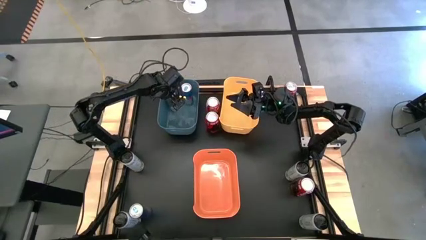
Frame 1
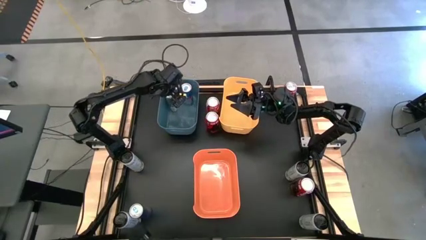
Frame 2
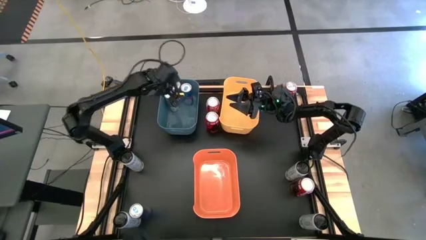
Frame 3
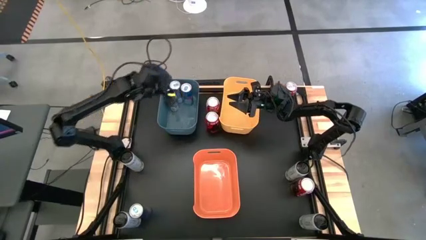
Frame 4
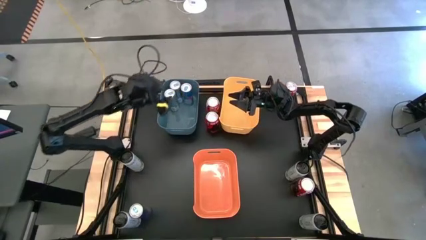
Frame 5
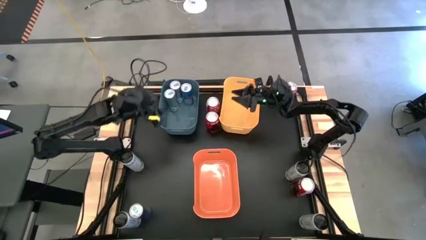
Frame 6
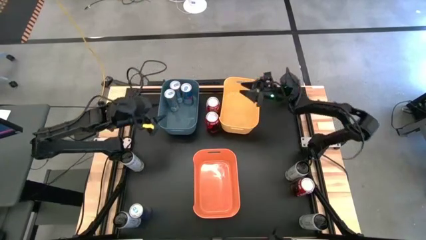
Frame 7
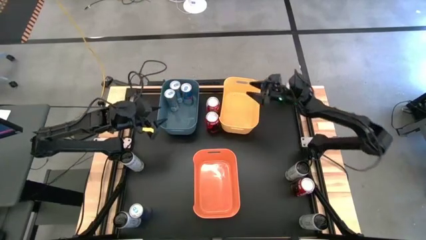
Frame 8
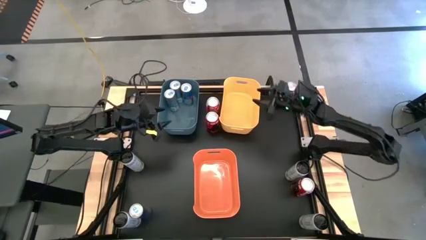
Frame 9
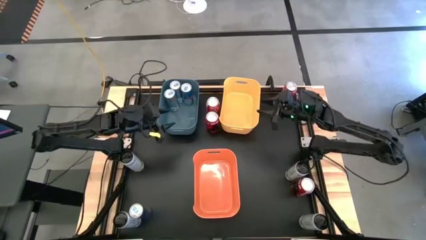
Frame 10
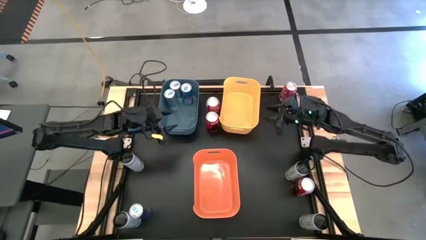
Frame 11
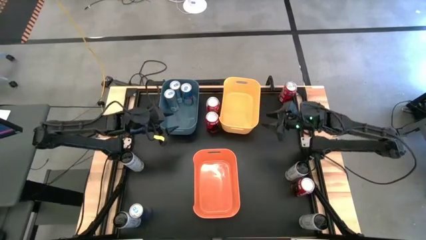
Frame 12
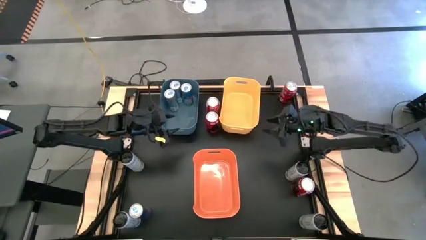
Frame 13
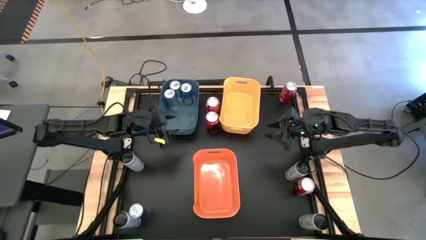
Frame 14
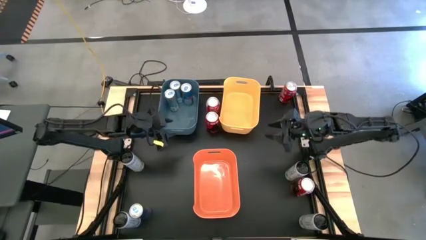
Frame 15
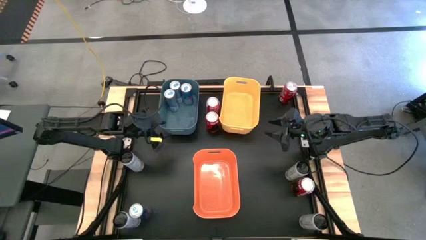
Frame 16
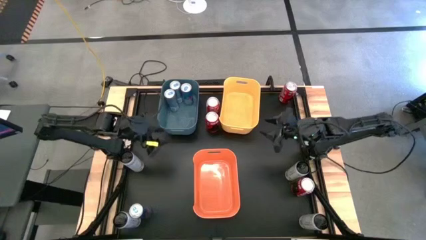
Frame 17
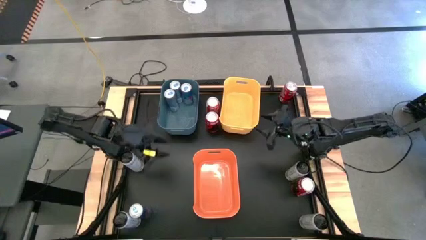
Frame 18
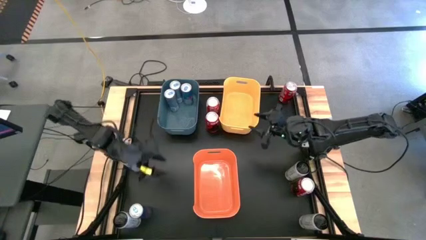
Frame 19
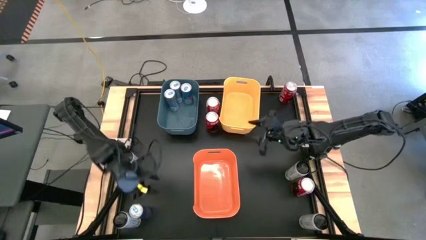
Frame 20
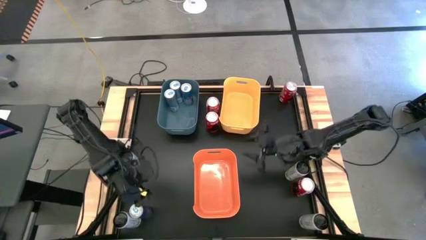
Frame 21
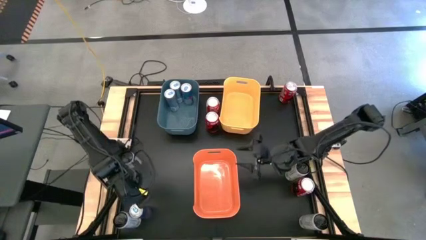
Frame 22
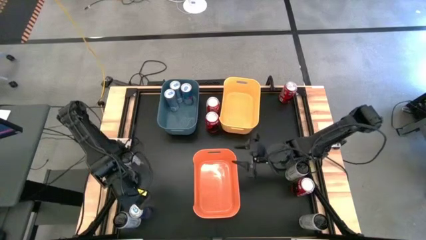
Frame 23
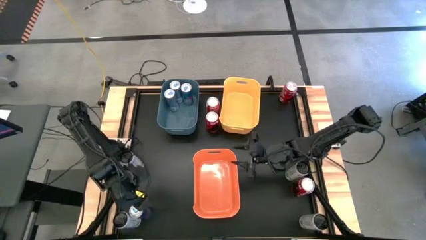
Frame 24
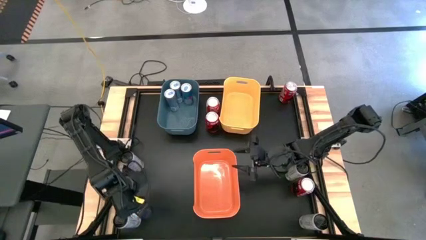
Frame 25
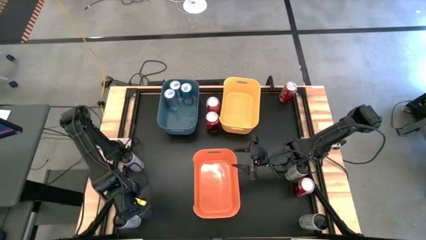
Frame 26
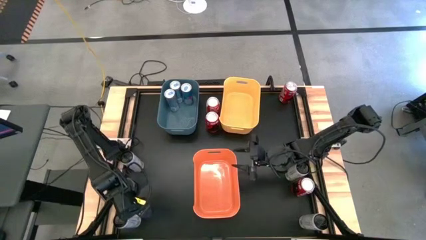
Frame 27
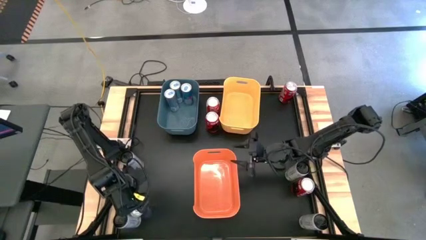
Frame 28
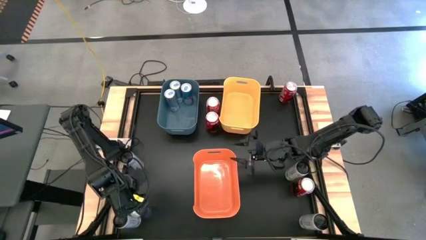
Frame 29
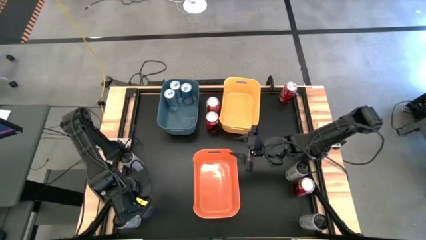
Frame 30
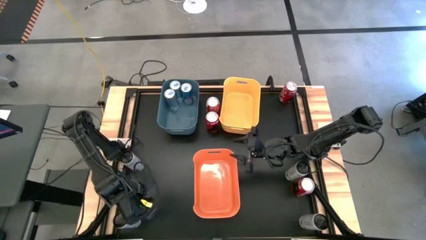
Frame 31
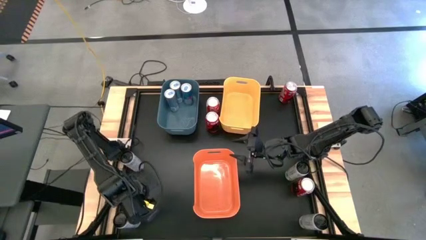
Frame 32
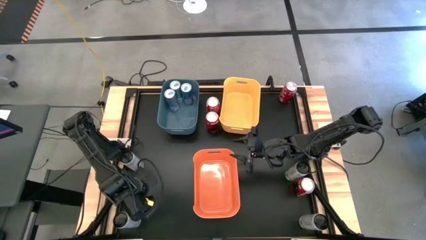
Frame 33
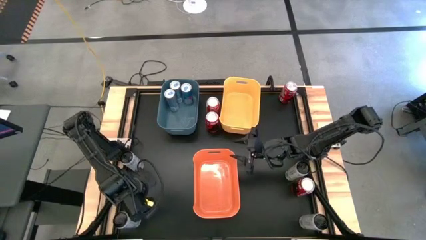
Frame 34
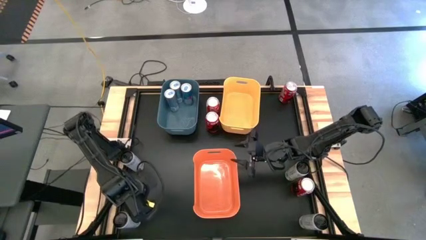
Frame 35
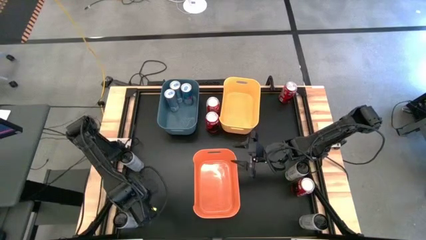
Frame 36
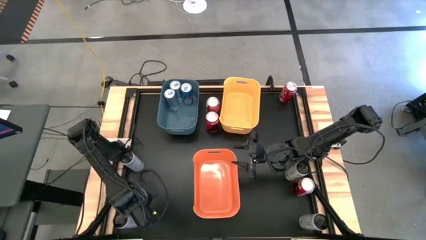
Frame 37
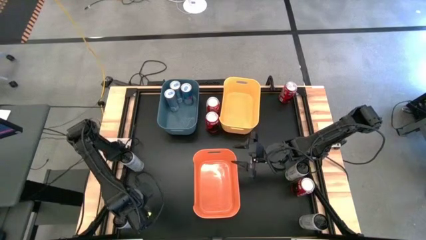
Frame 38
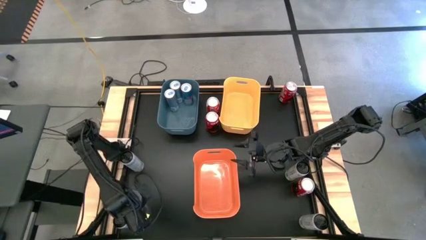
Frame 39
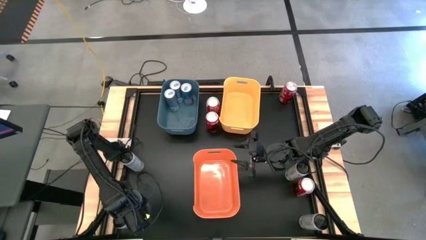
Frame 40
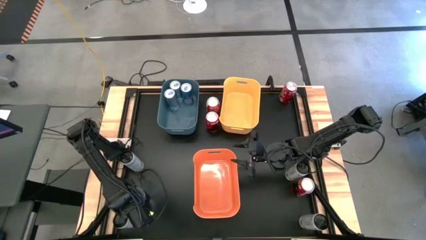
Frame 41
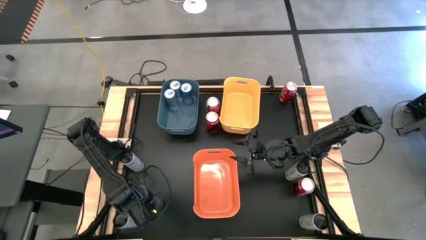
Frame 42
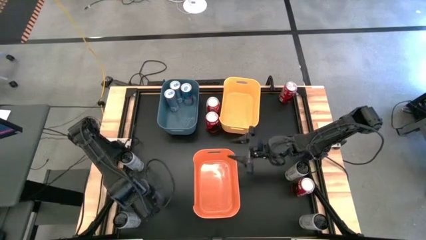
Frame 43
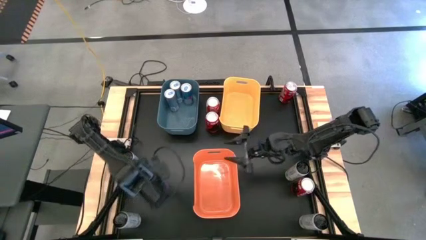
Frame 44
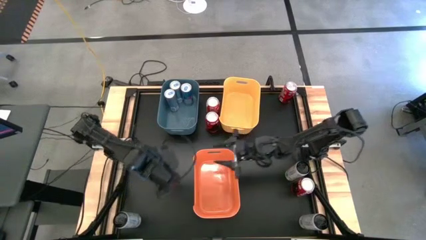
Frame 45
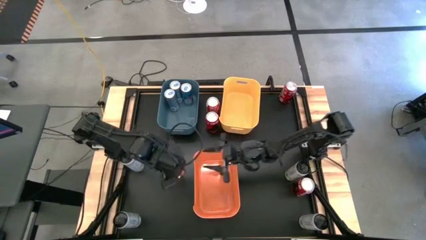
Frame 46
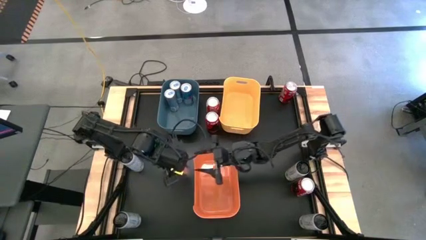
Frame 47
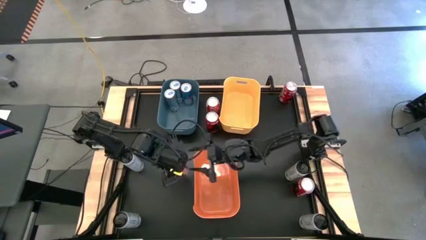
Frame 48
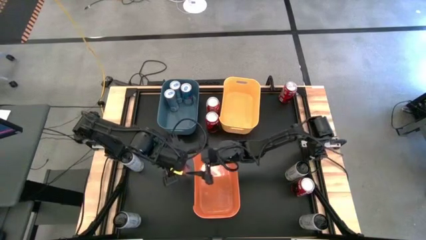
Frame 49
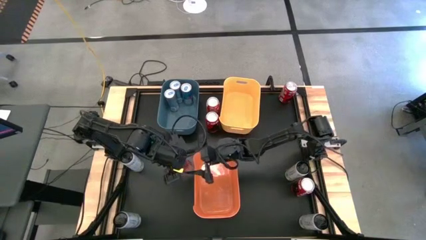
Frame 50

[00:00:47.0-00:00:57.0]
Task: Sort soda cans
Put the blue soda can into the blue bin
